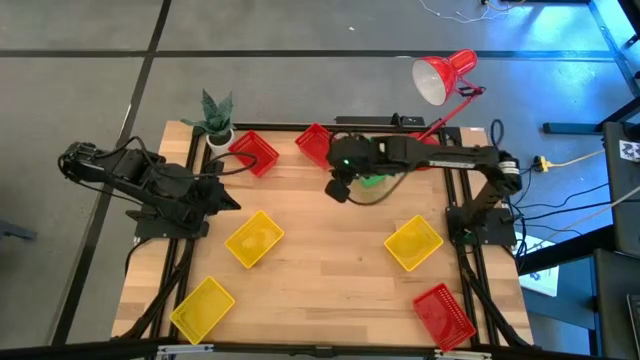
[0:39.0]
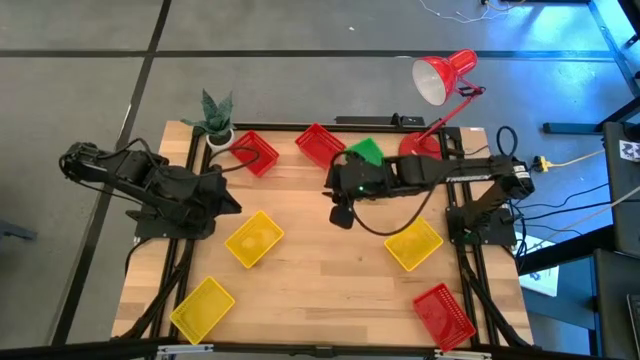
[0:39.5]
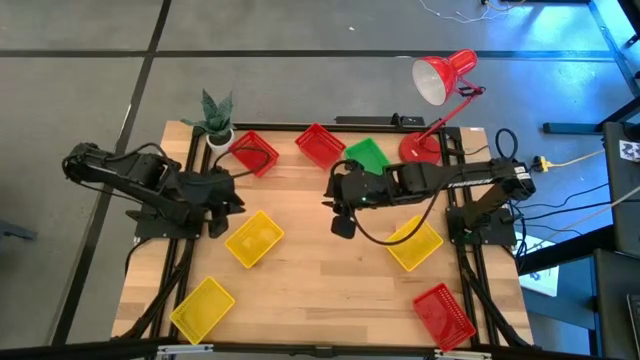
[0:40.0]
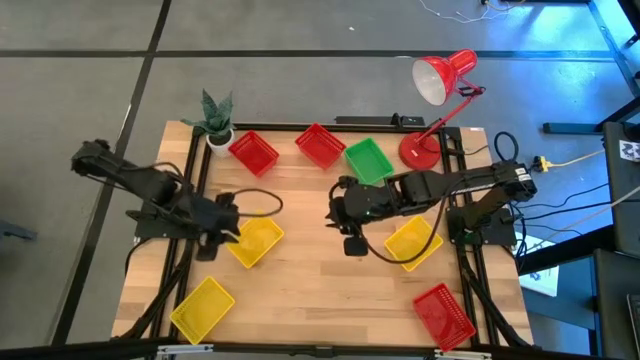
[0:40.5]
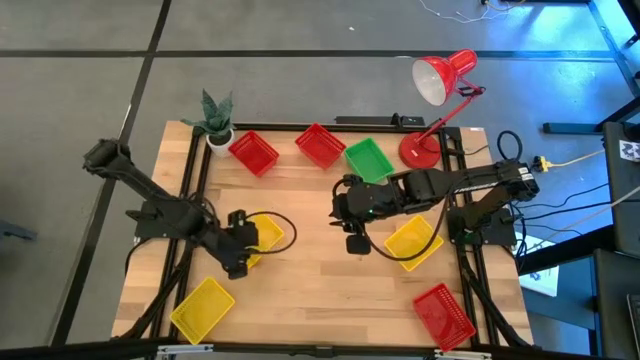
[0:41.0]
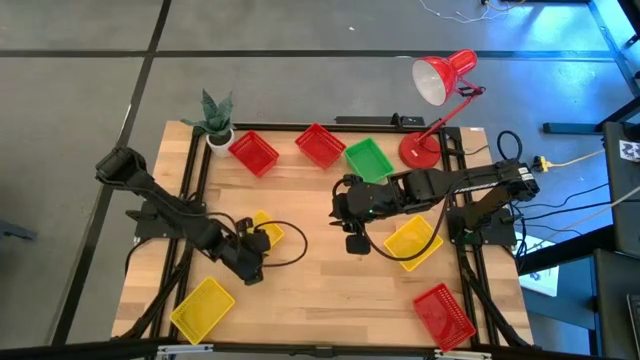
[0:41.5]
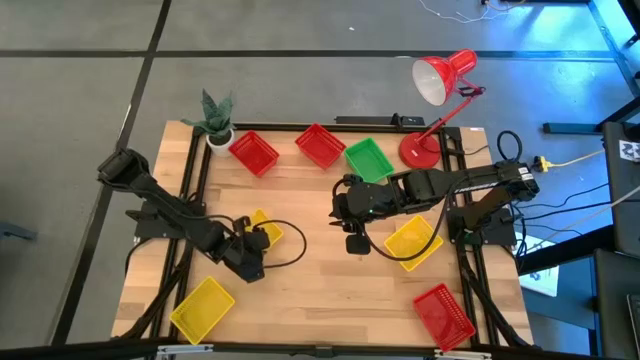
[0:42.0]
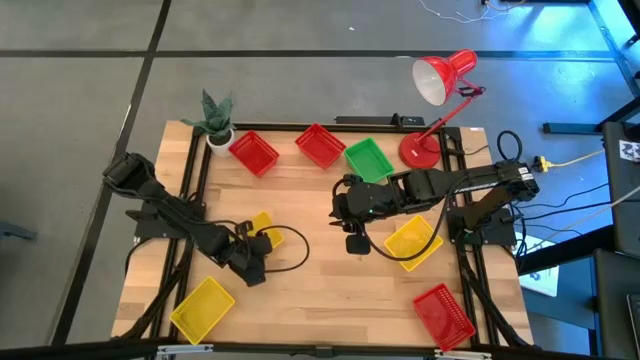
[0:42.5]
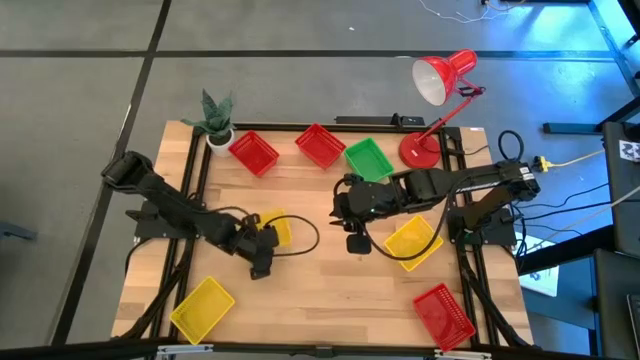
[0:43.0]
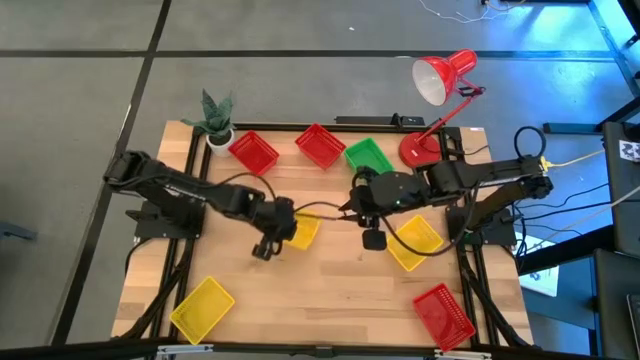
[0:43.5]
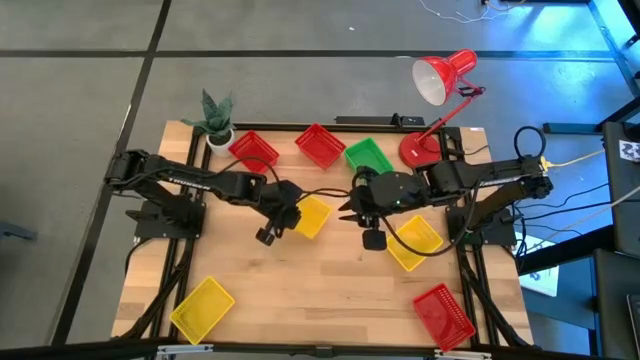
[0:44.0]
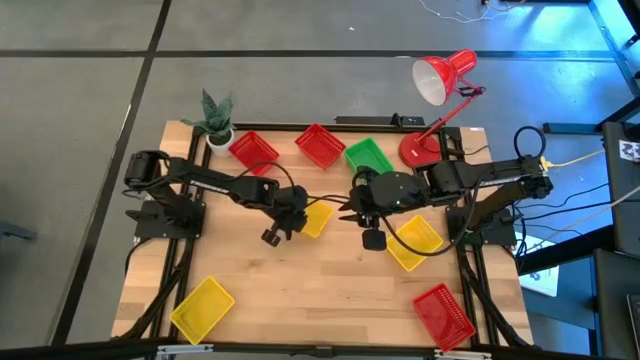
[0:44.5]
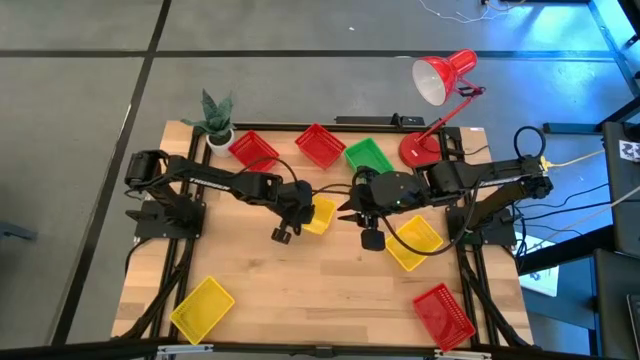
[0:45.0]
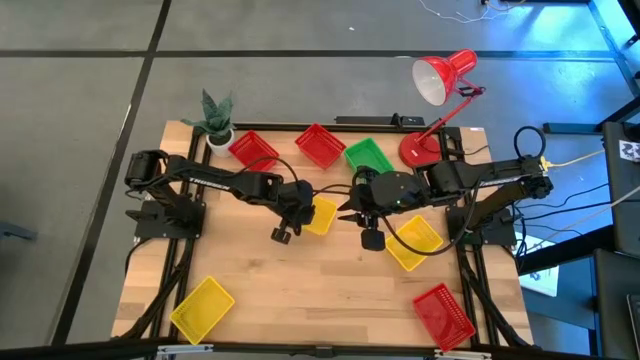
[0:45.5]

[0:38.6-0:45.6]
Move the top left yellow bin to the center of the table

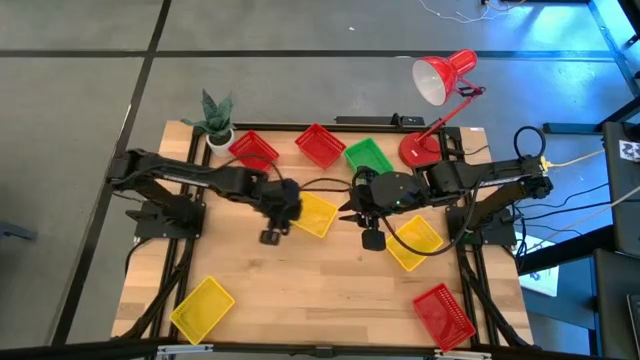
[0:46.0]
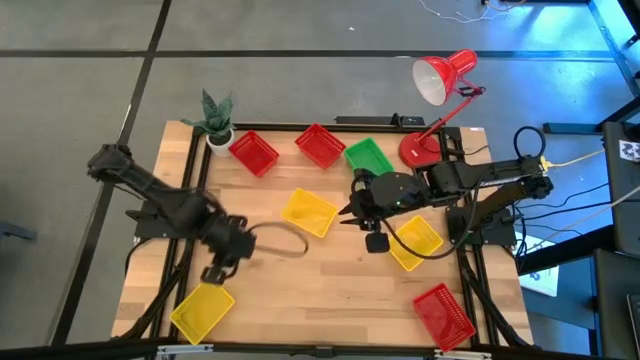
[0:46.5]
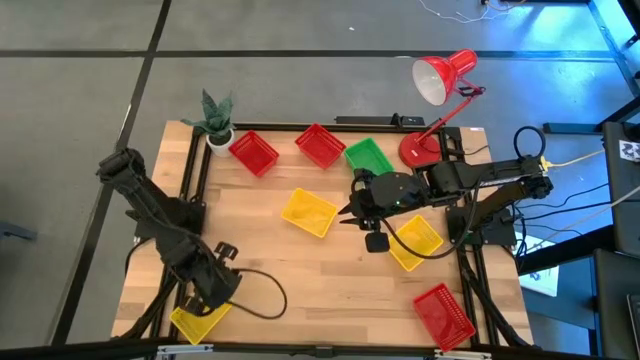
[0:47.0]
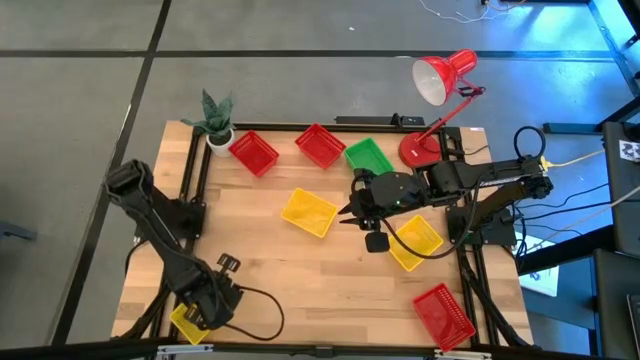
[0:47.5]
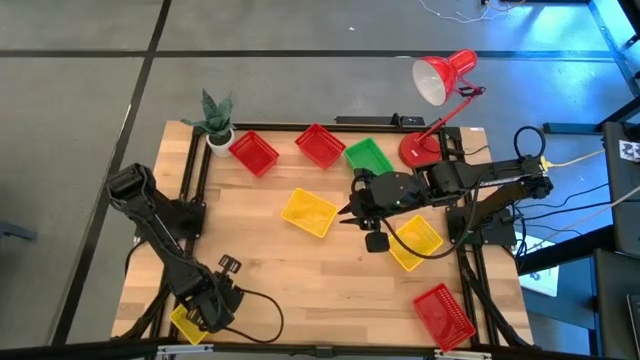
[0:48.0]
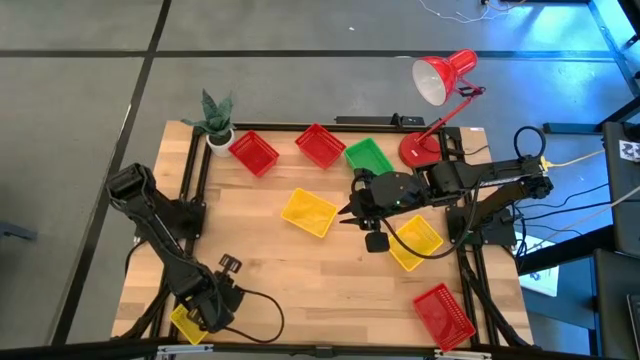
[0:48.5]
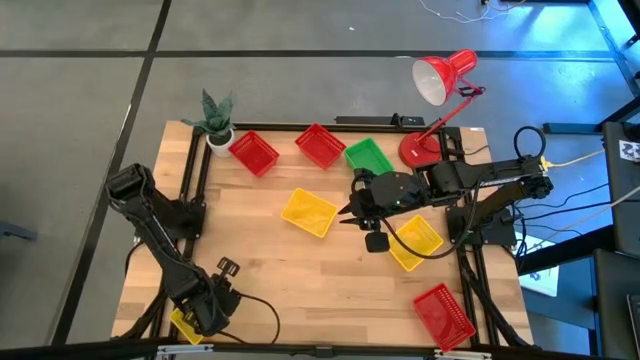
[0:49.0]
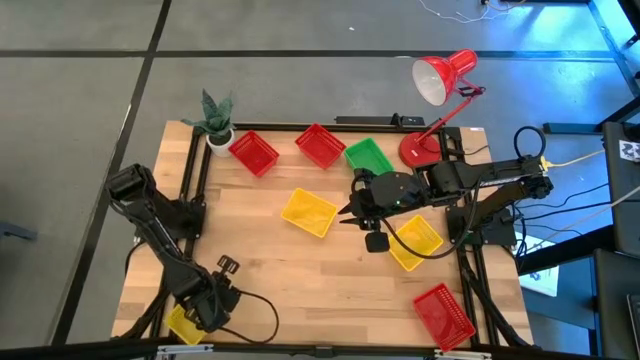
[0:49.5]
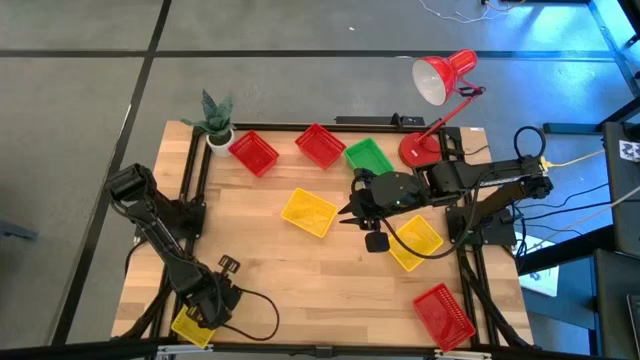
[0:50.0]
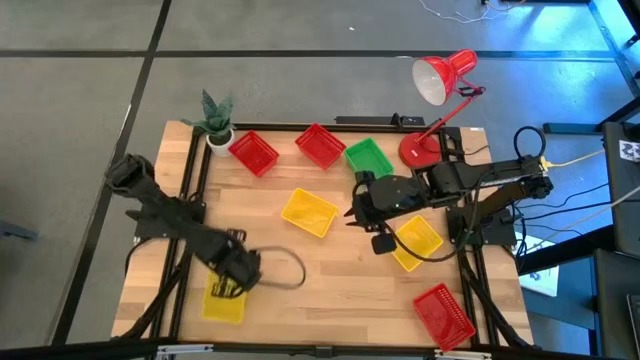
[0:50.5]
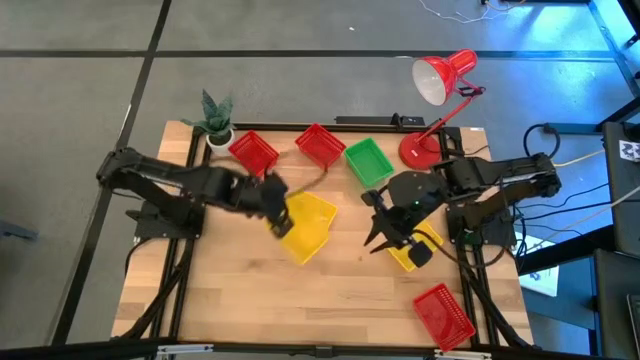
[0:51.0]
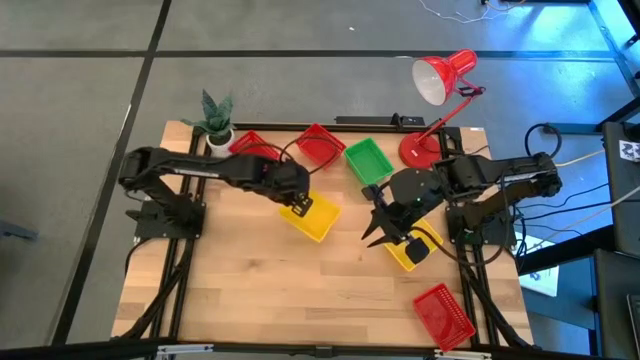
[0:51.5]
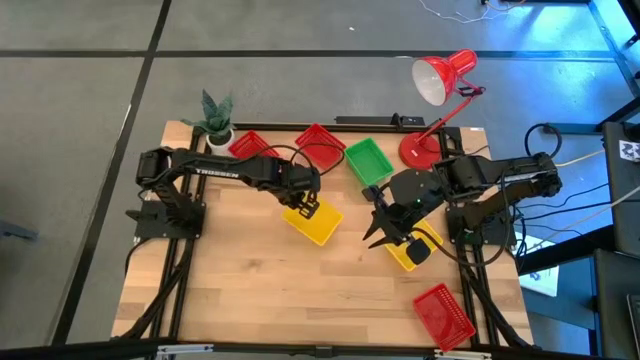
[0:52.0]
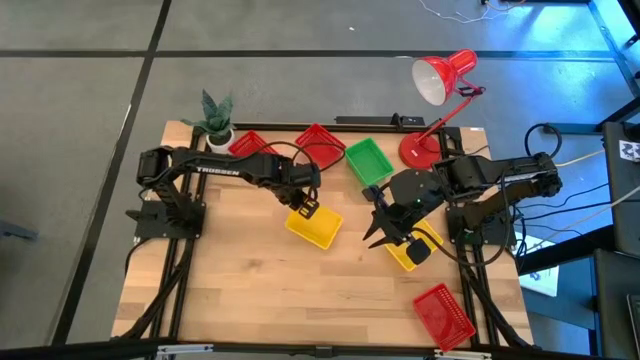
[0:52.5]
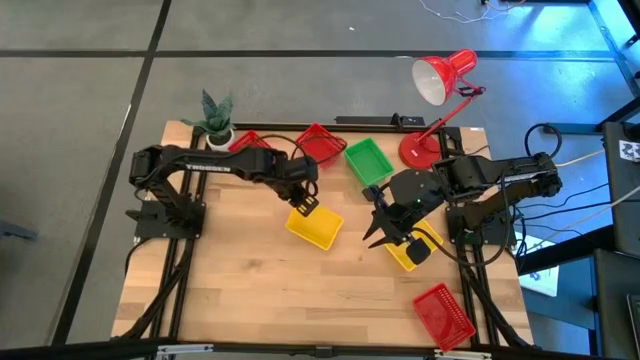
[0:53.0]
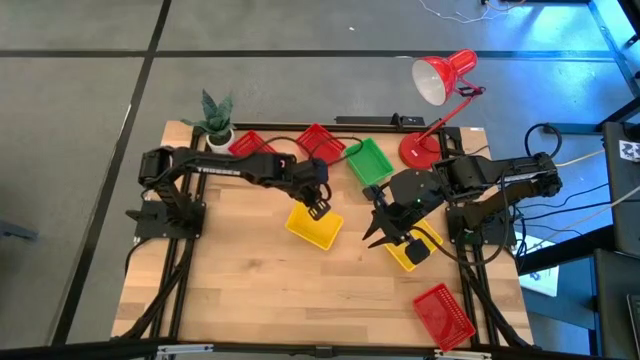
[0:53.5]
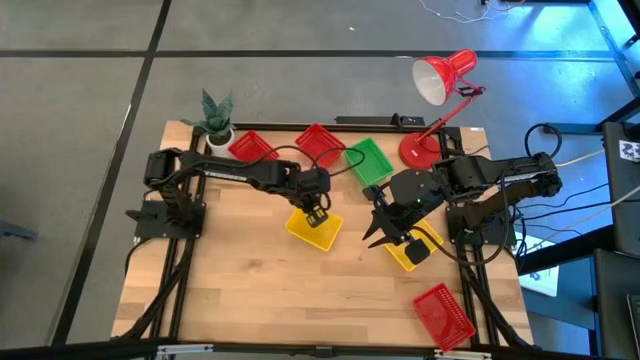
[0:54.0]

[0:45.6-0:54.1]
Stack the bottom left yellow bin on the top left yellow bin

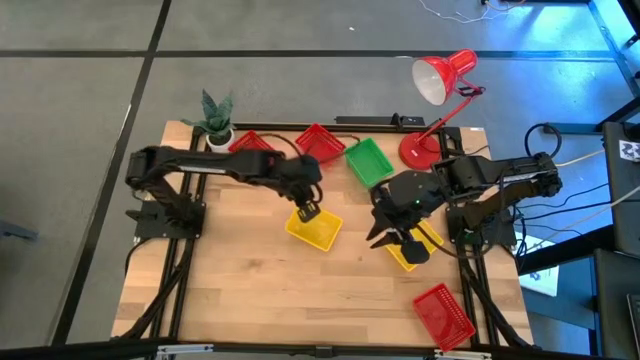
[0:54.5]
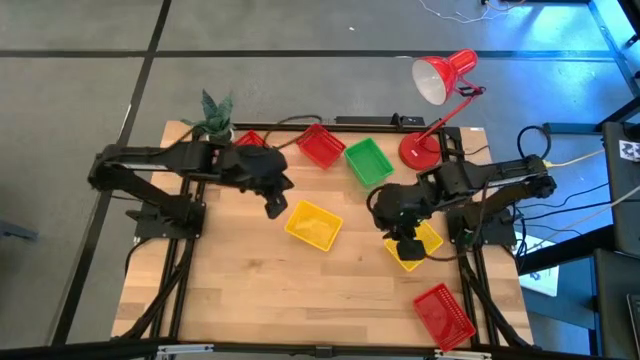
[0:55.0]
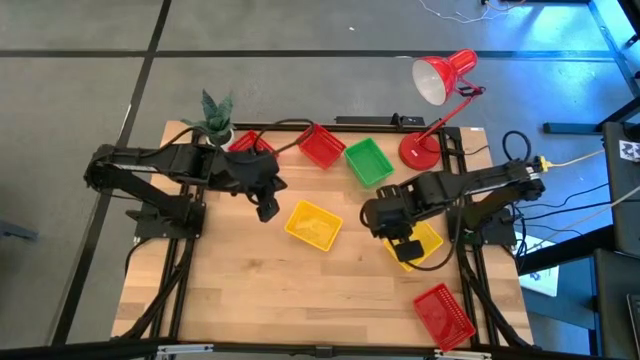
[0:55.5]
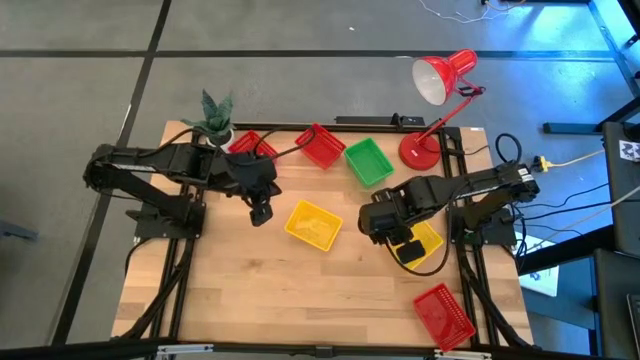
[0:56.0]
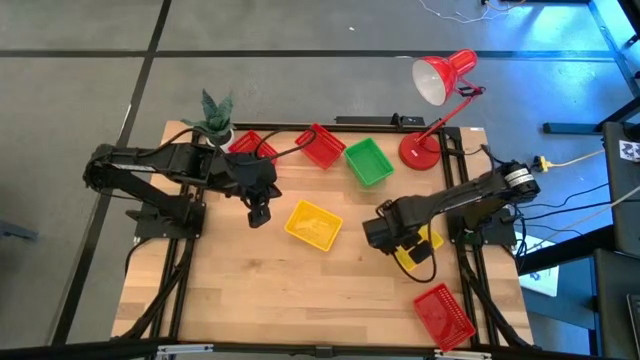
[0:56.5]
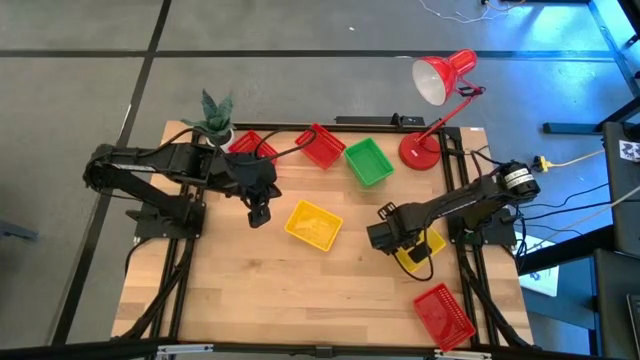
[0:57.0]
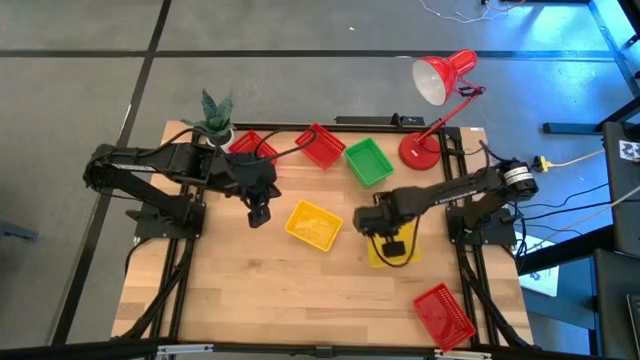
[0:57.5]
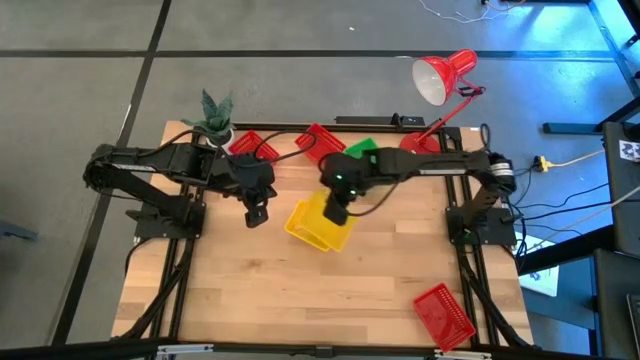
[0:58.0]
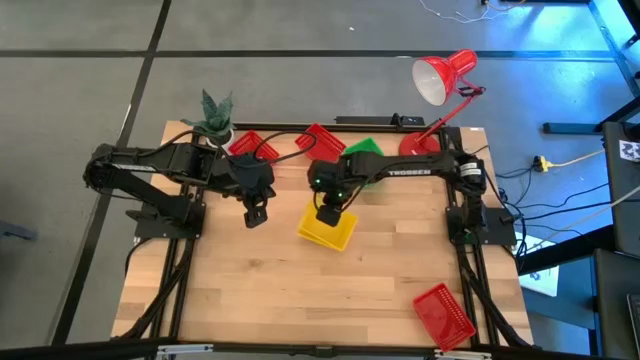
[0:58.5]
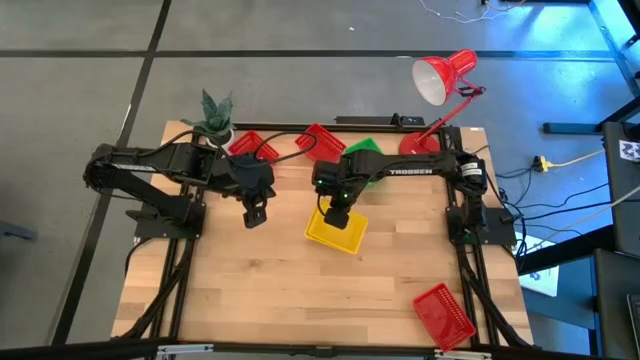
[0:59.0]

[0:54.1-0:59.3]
Stack the right yellow bin on the left yellow bin
